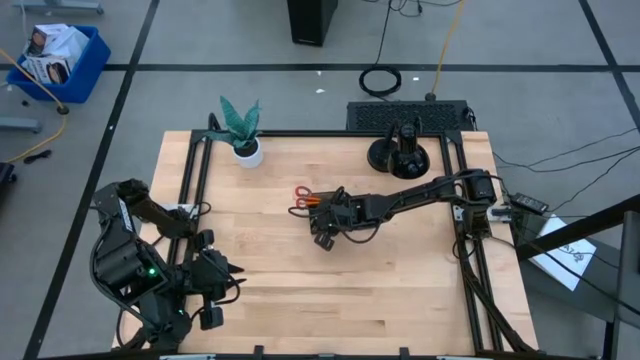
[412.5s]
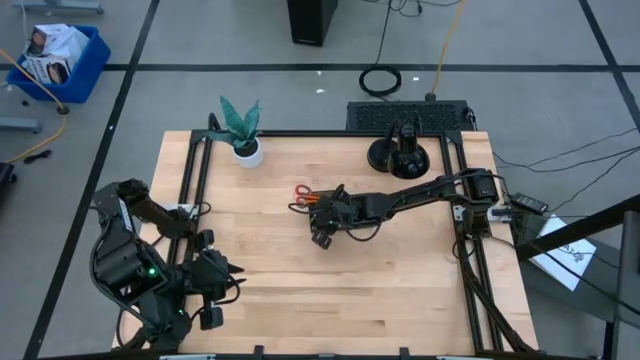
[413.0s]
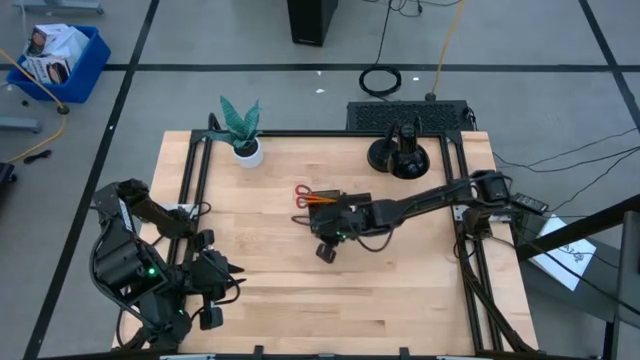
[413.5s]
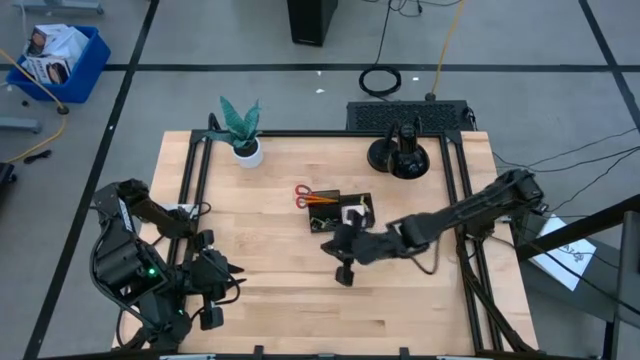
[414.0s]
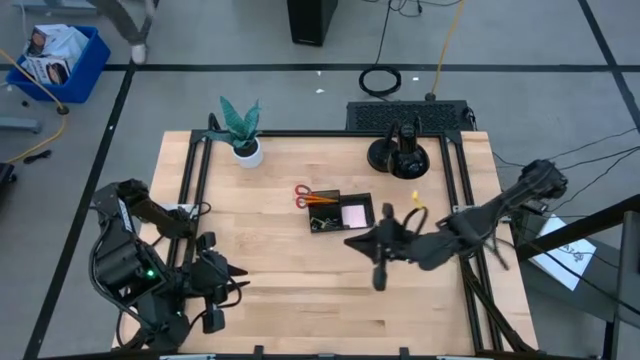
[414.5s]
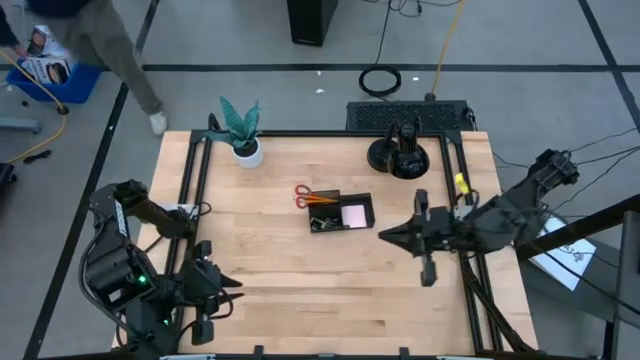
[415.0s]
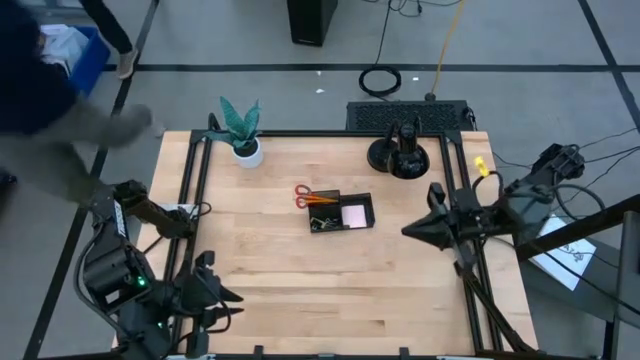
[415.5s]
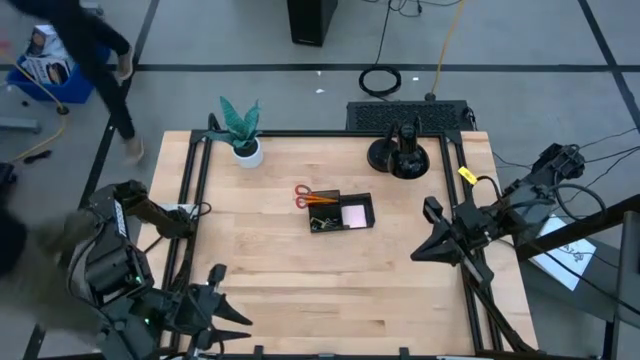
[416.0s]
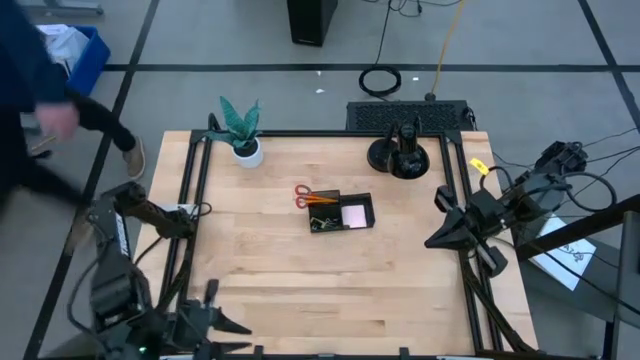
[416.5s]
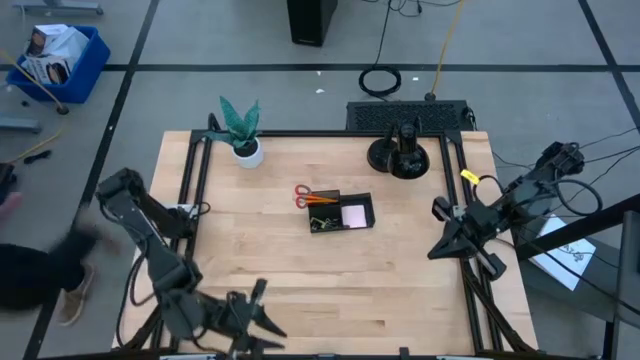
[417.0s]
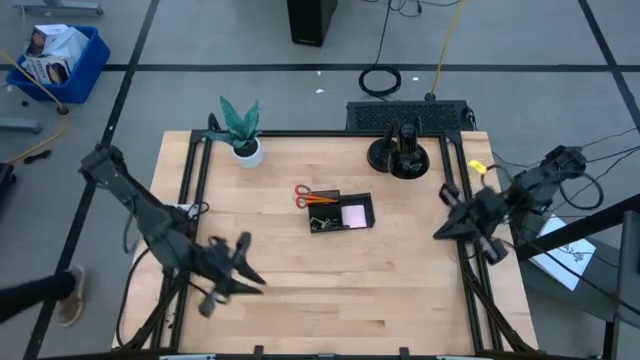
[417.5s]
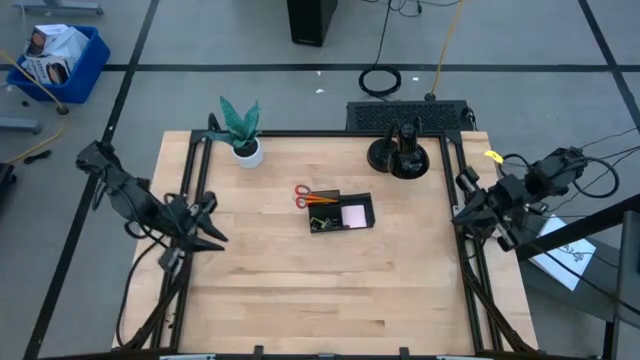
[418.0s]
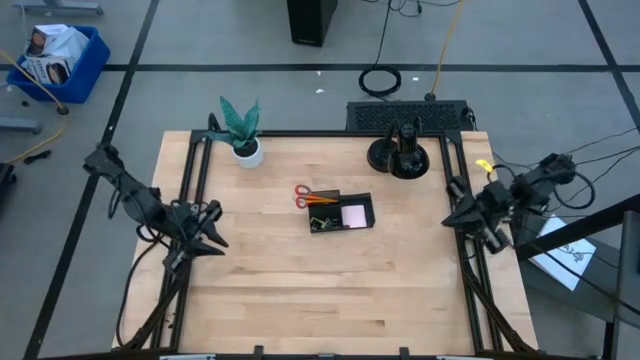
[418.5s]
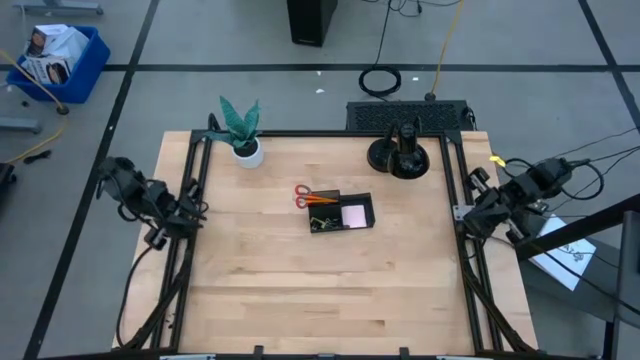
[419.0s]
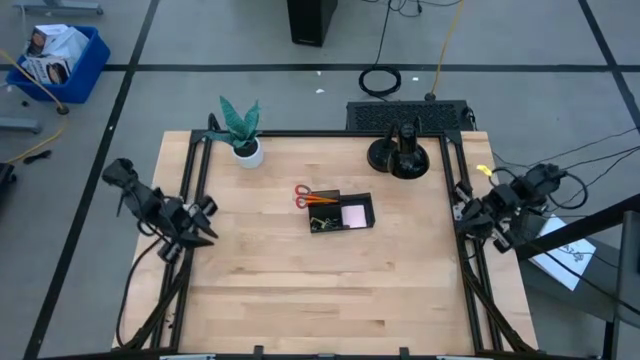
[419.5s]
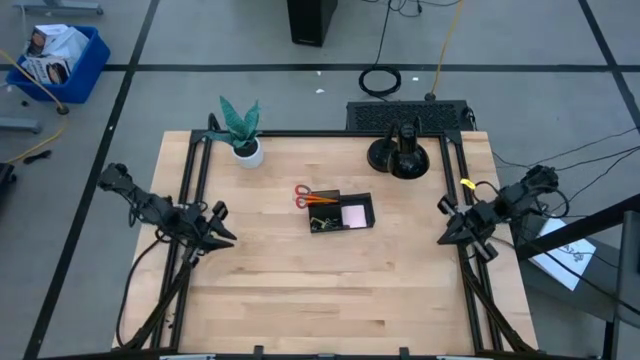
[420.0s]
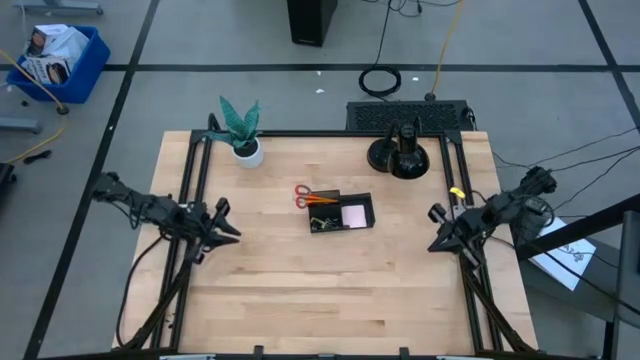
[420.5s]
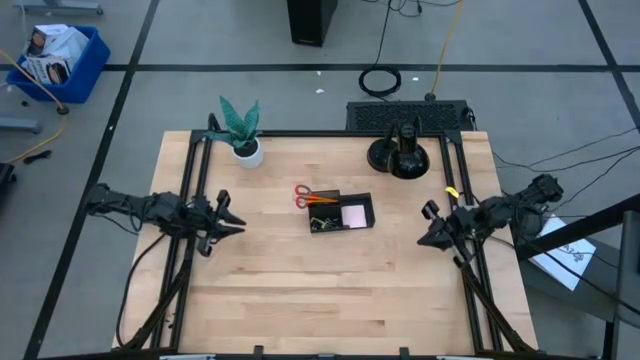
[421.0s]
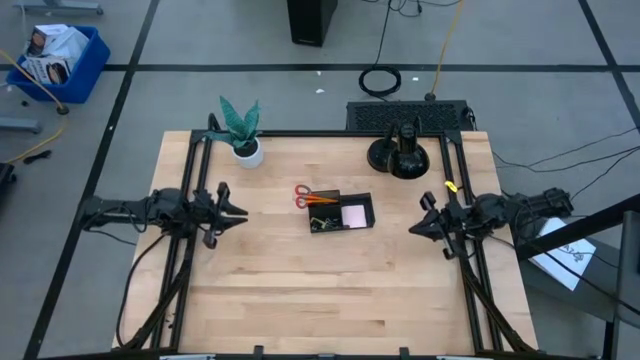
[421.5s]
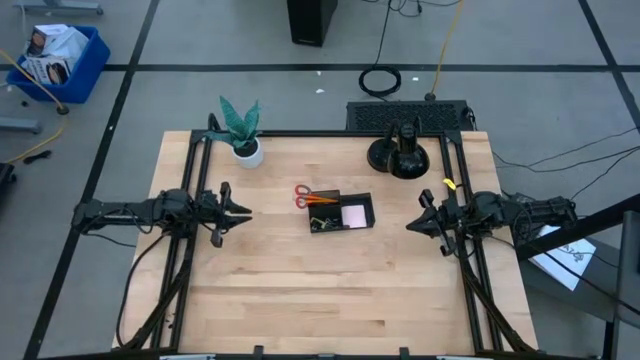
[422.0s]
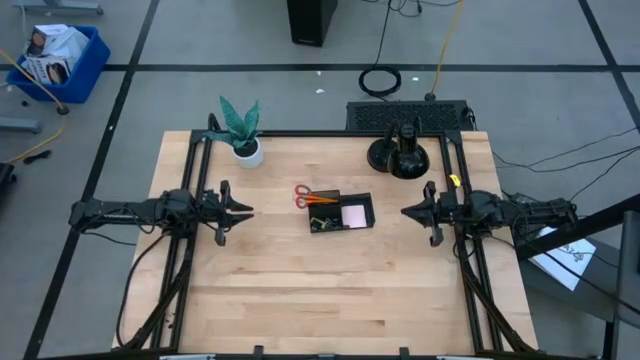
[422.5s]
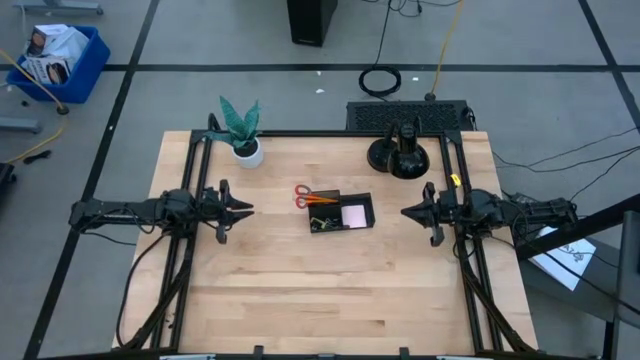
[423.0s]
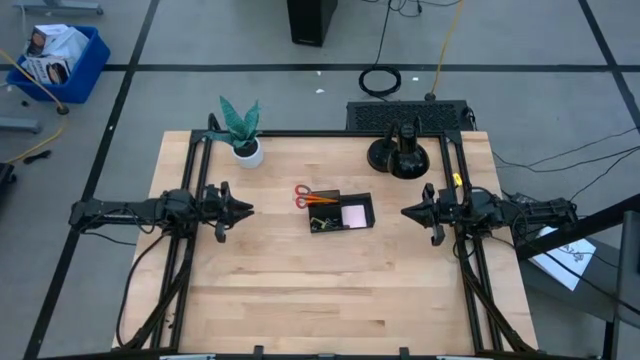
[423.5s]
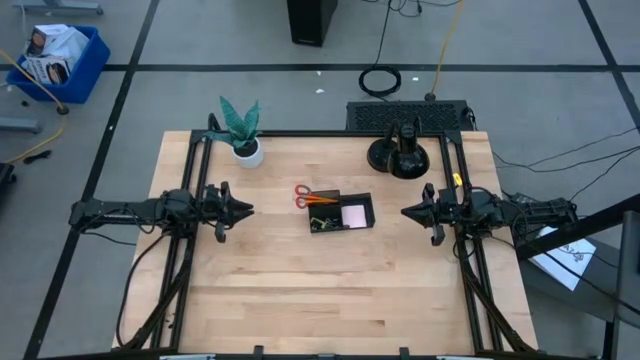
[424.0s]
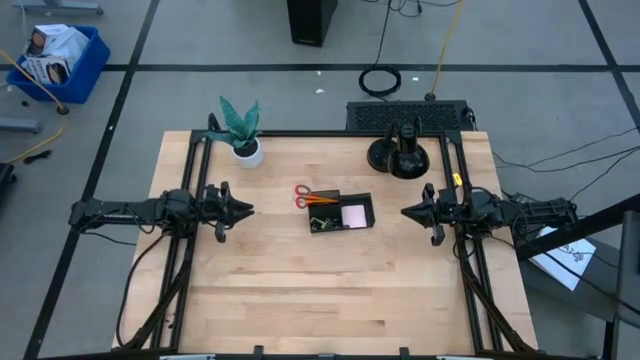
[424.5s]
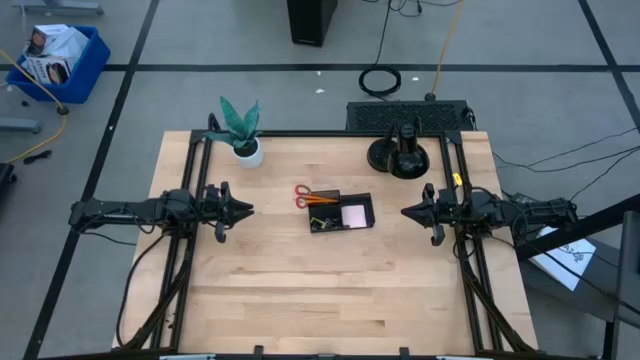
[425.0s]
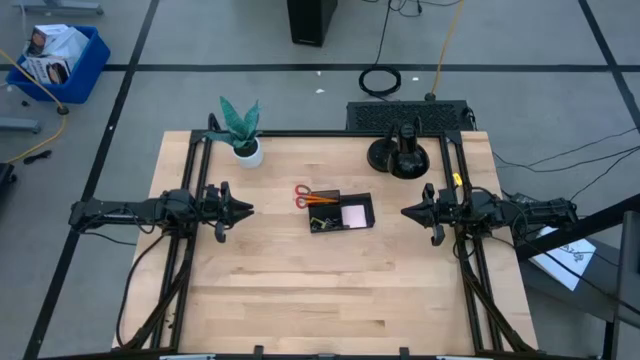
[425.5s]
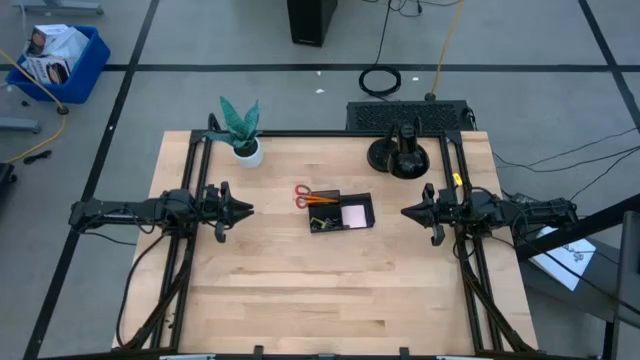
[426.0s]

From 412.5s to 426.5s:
Task: Pick and place office supplies into organizer
Return to Home Position

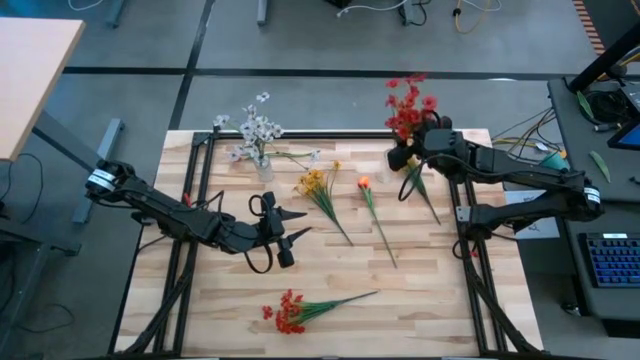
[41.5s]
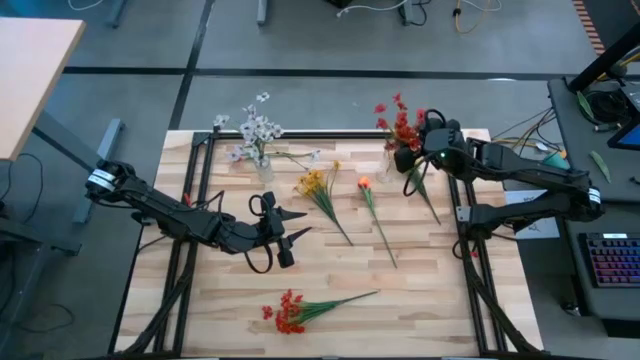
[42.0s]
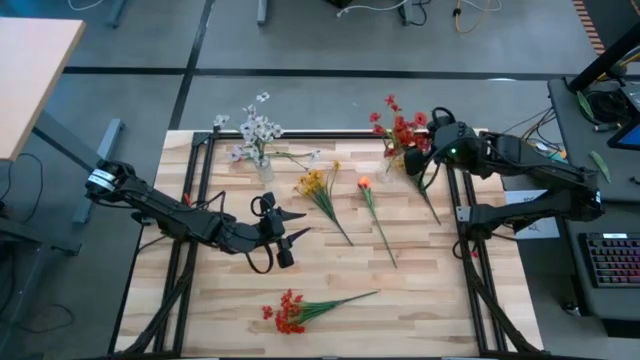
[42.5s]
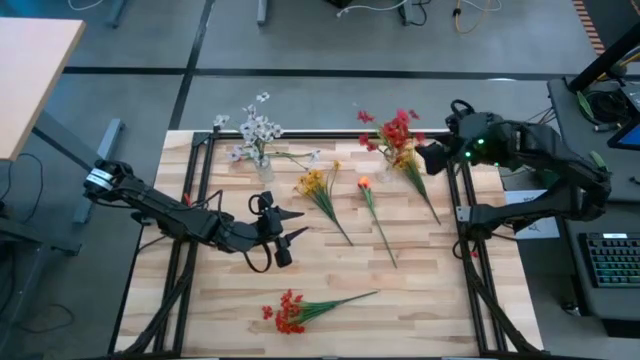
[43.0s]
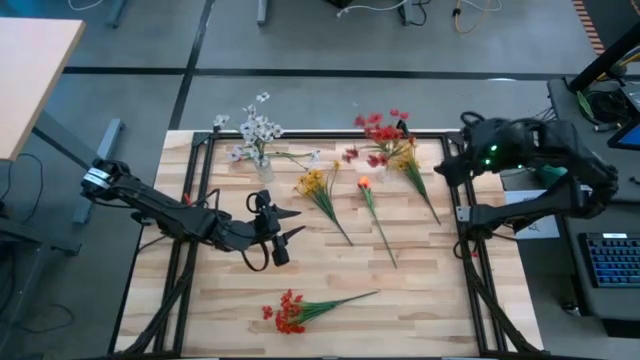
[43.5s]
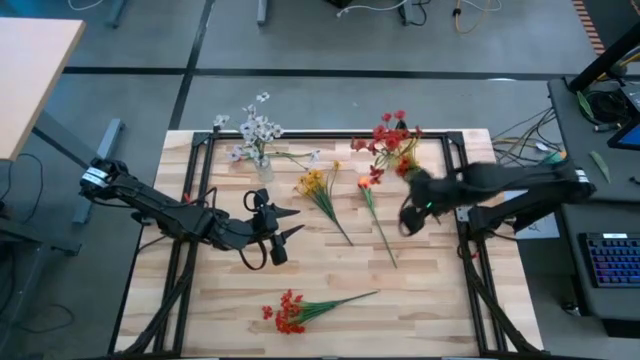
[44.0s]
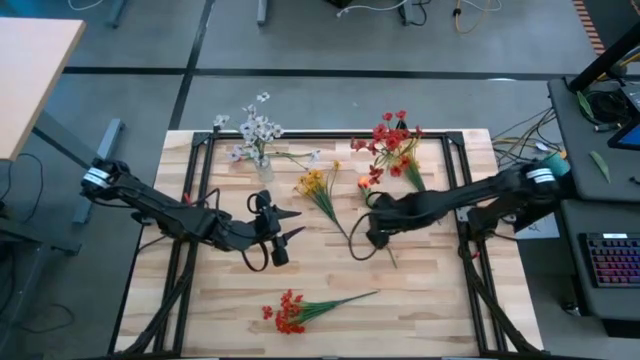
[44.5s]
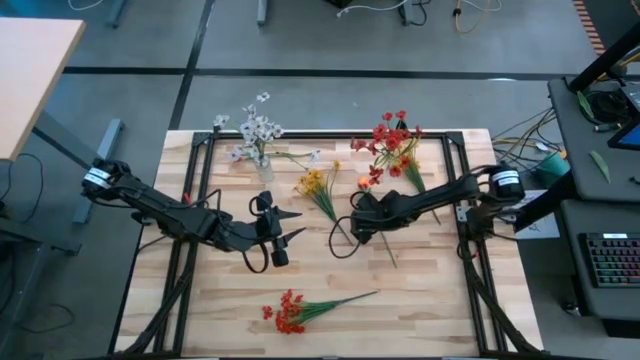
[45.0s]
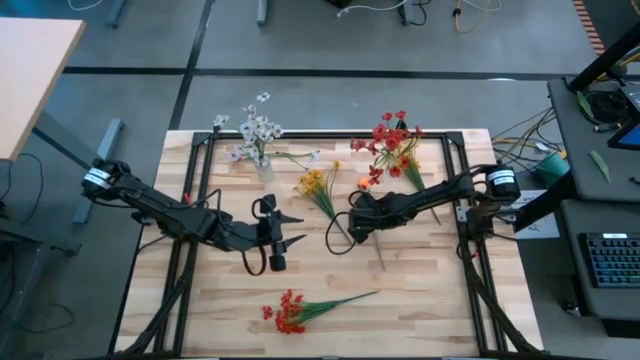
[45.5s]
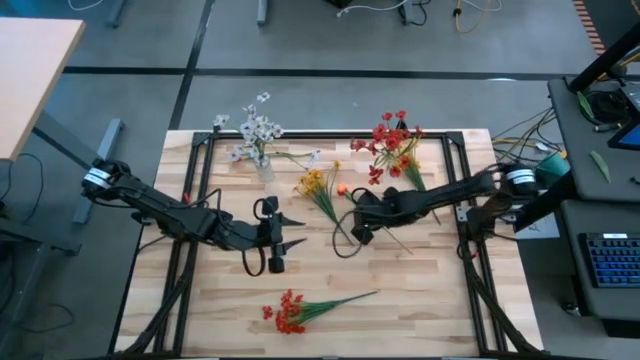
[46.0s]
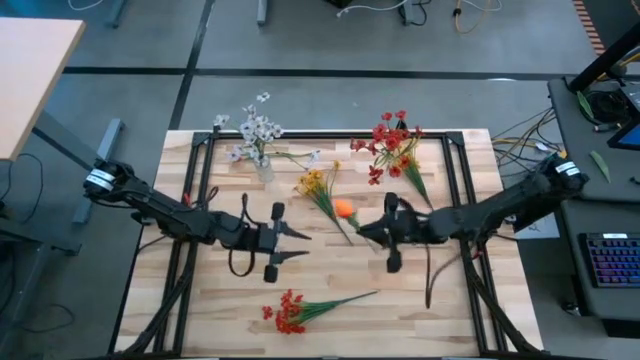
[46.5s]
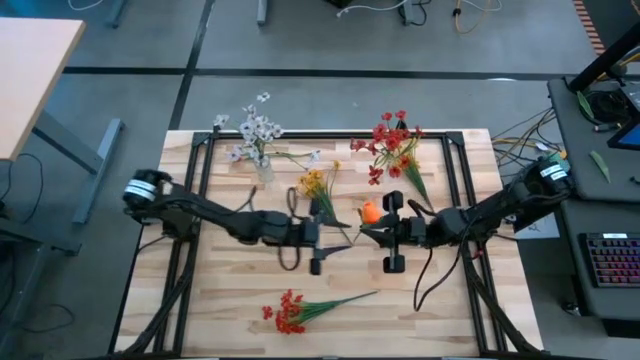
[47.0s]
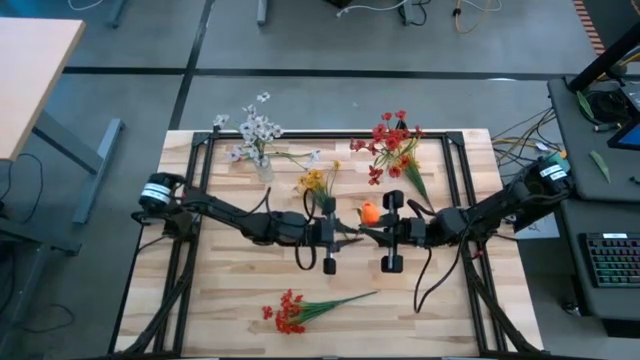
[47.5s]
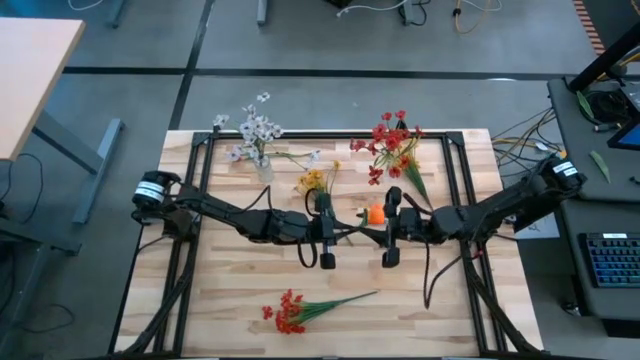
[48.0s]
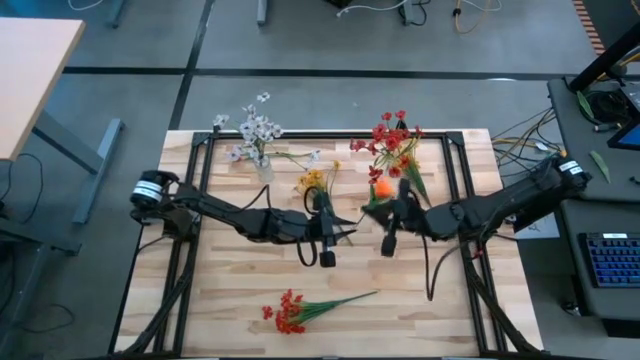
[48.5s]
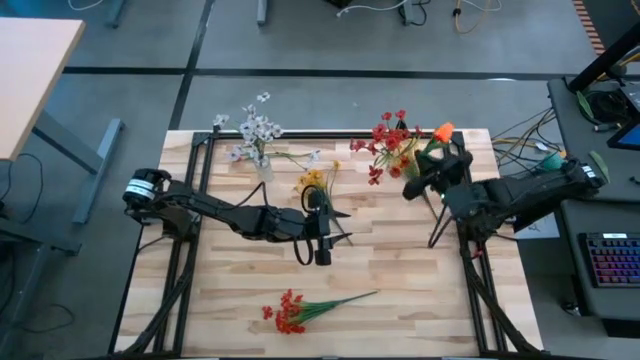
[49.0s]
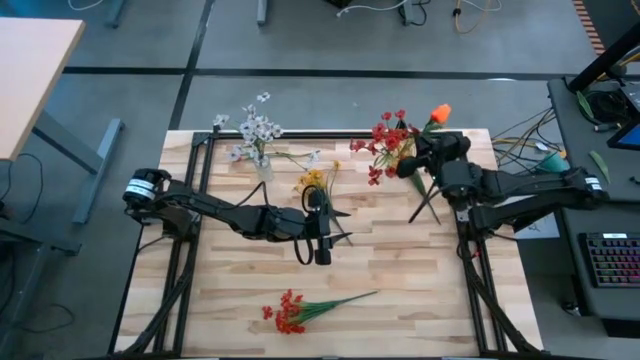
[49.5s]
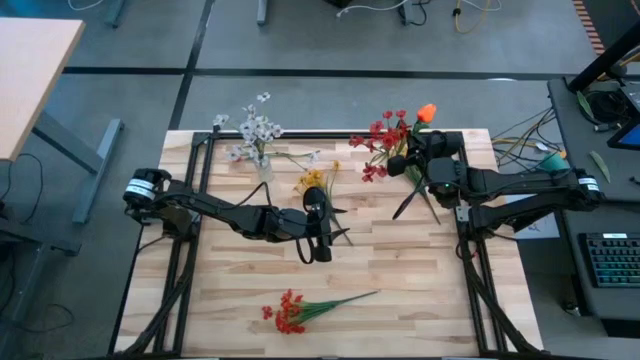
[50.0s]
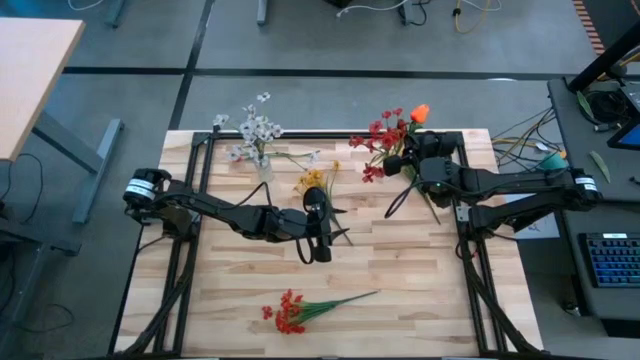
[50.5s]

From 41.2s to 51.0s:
Task: Sort flowers into vase by color
Put the orange tulip into the right transparent flower vase
